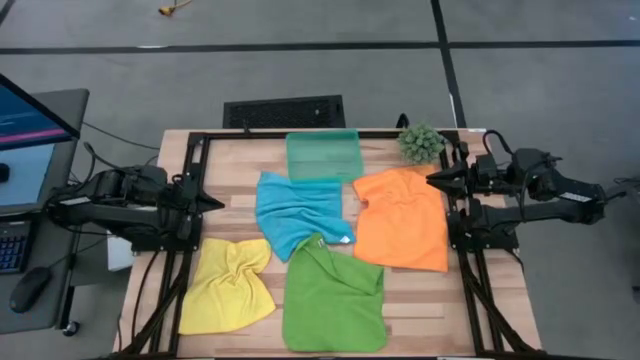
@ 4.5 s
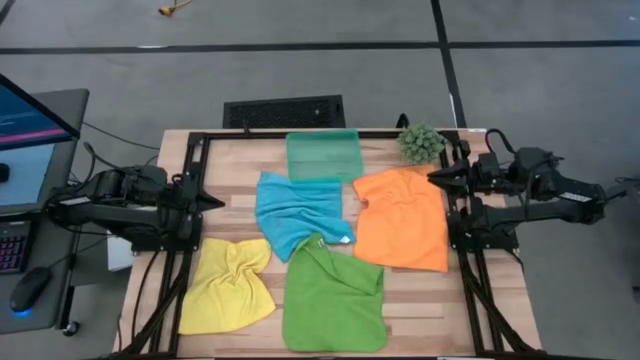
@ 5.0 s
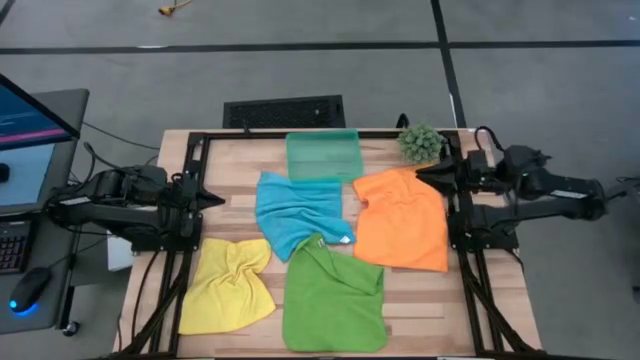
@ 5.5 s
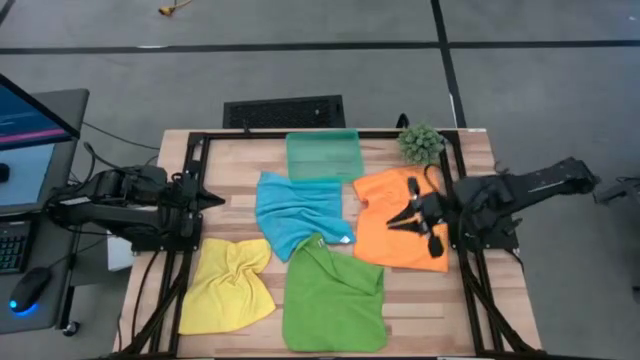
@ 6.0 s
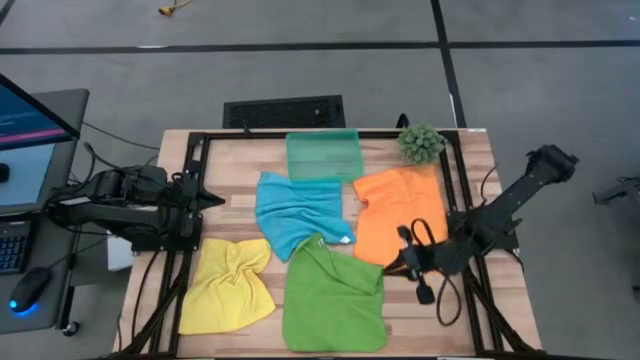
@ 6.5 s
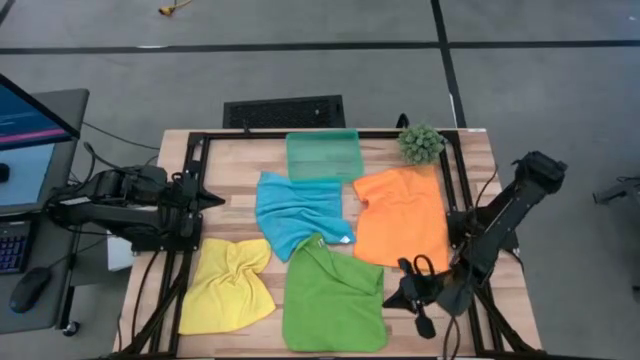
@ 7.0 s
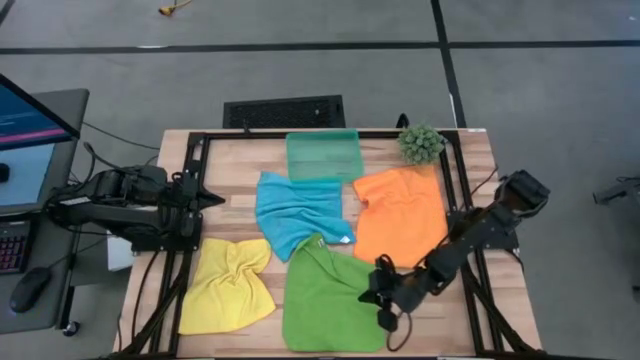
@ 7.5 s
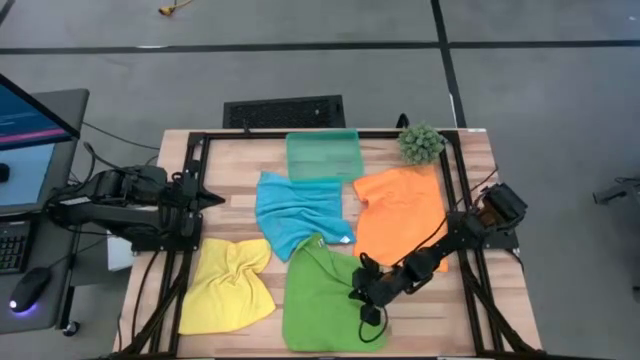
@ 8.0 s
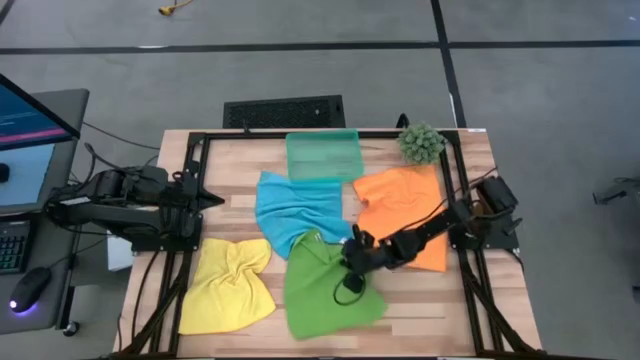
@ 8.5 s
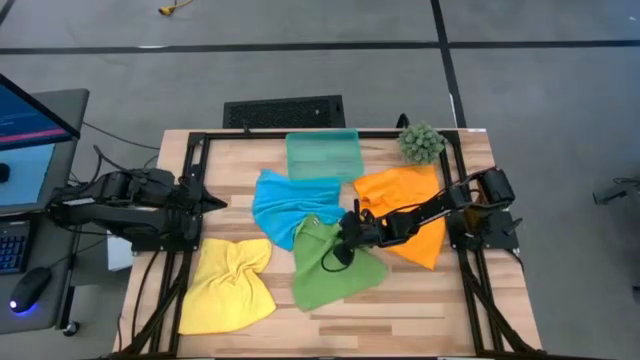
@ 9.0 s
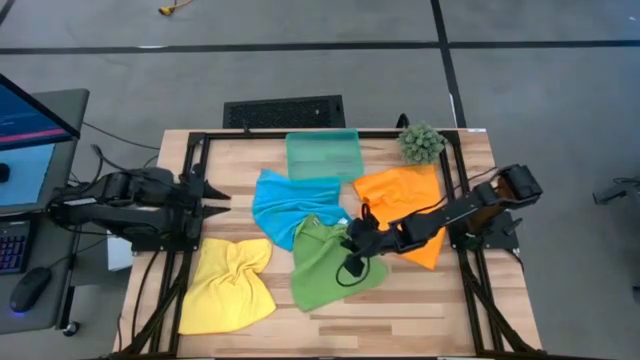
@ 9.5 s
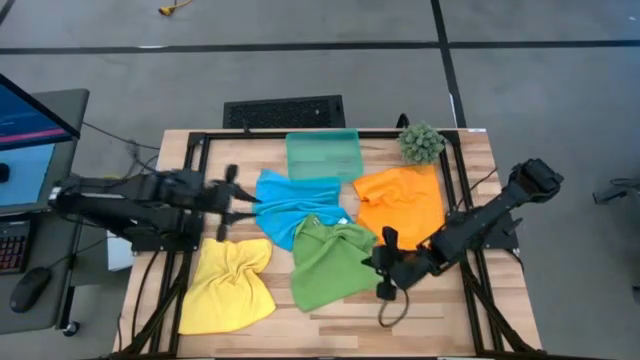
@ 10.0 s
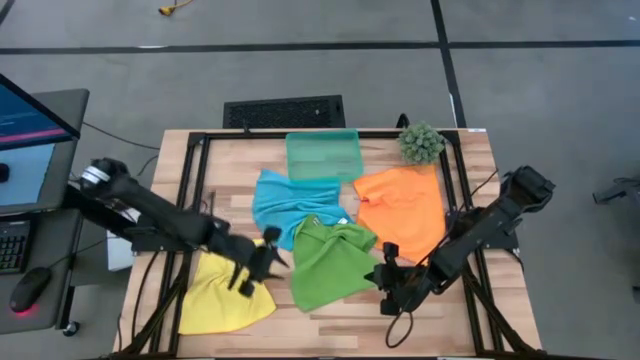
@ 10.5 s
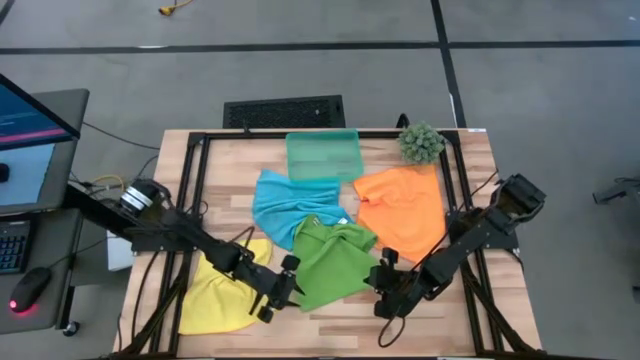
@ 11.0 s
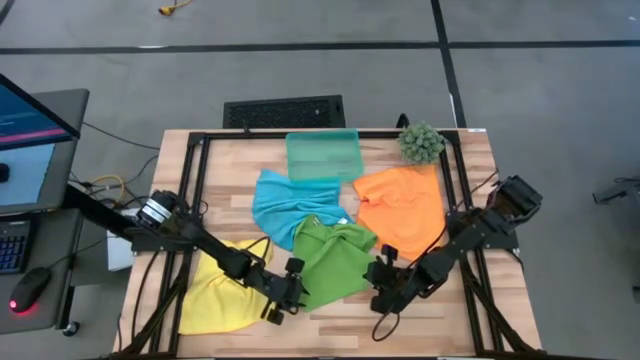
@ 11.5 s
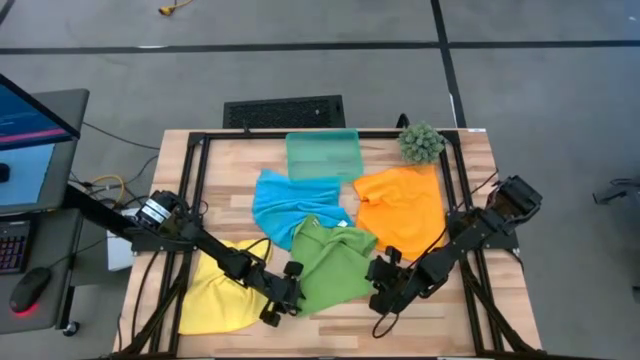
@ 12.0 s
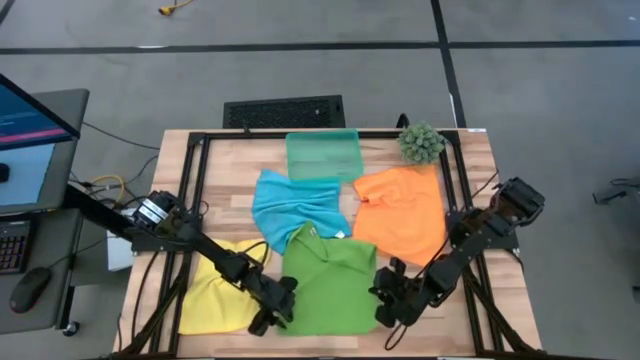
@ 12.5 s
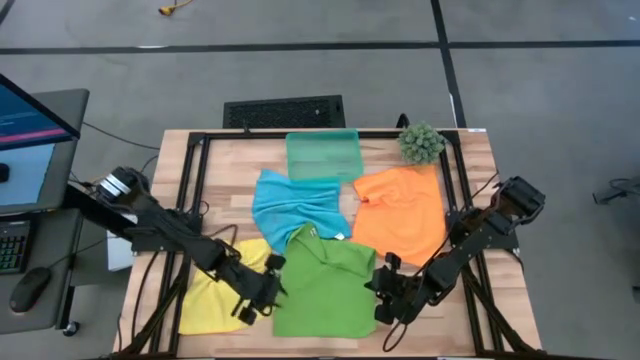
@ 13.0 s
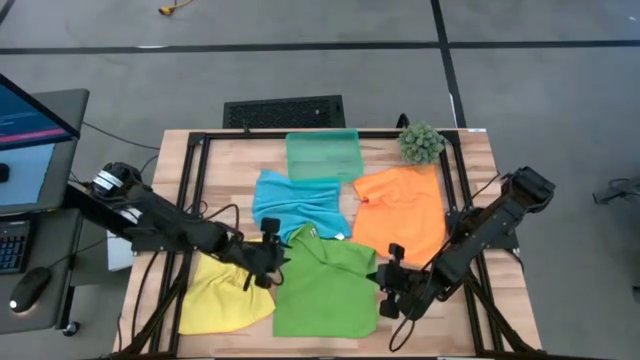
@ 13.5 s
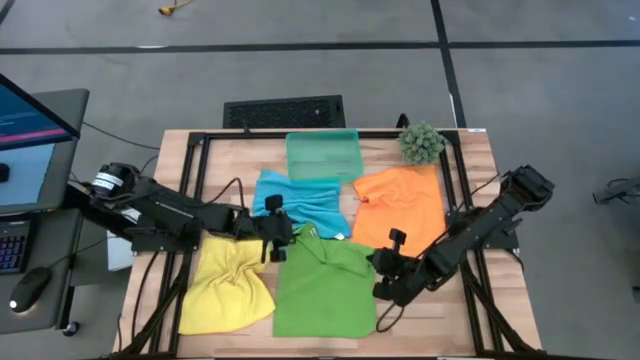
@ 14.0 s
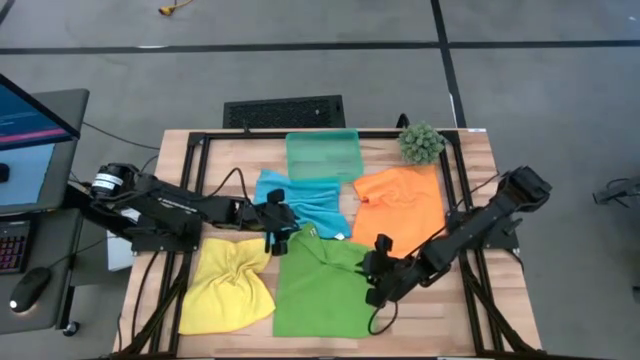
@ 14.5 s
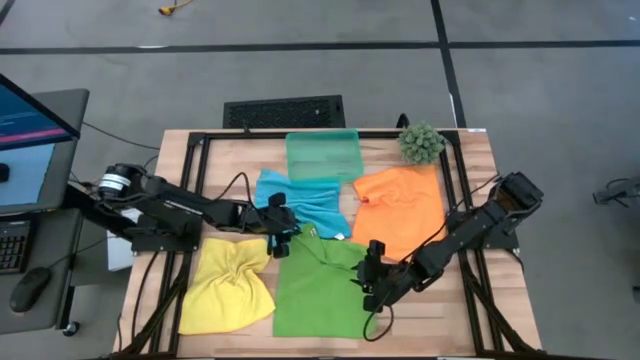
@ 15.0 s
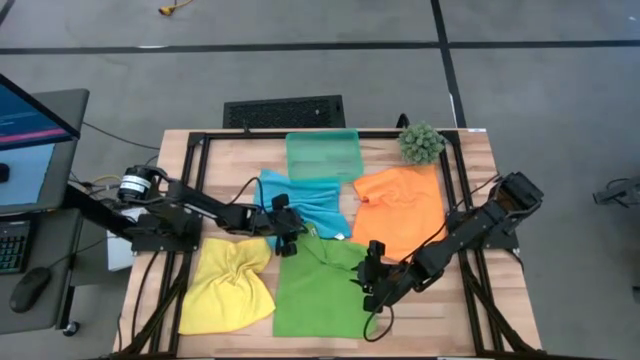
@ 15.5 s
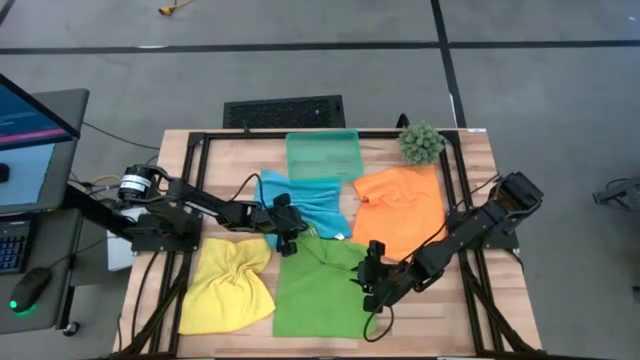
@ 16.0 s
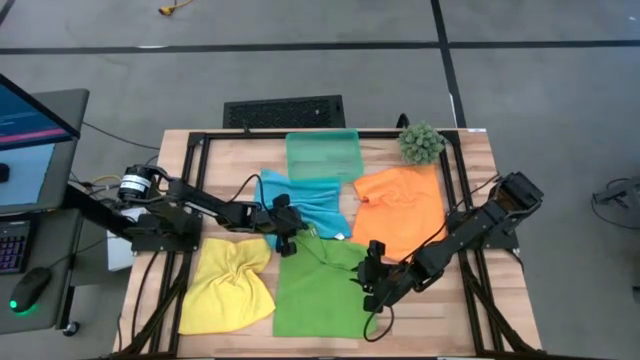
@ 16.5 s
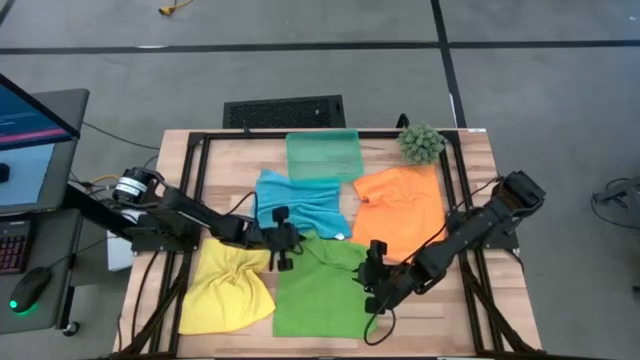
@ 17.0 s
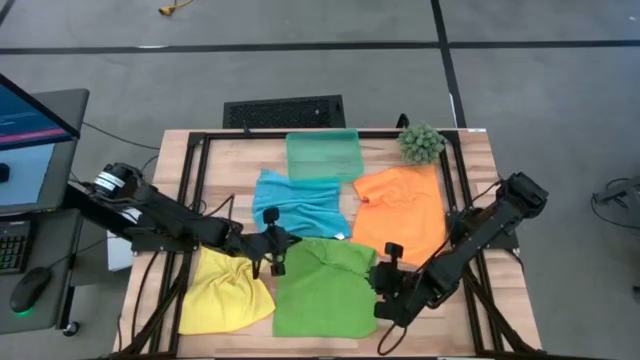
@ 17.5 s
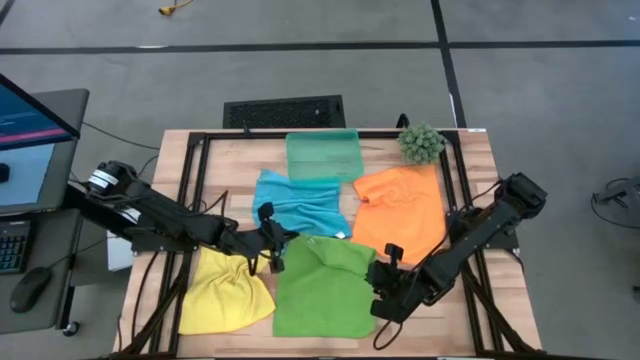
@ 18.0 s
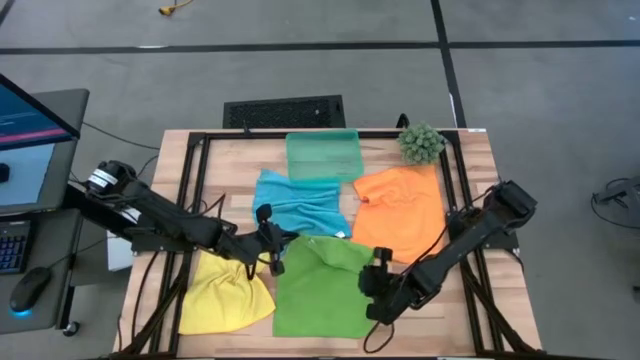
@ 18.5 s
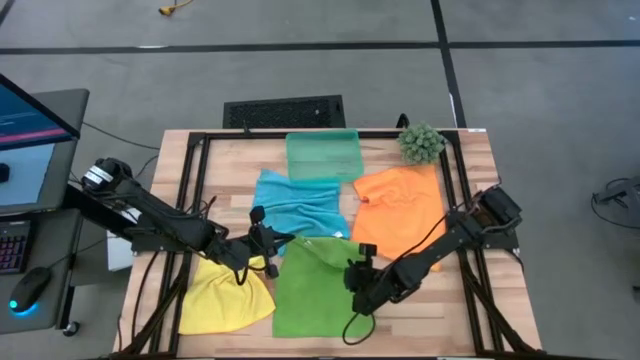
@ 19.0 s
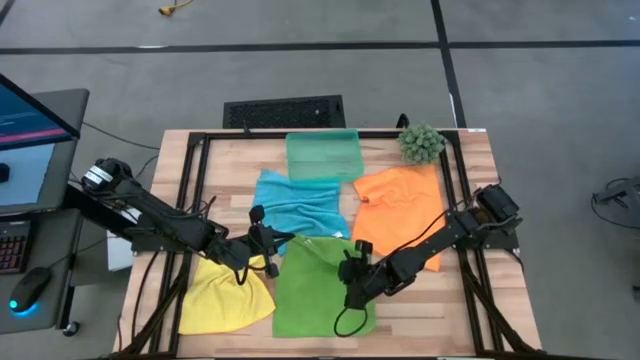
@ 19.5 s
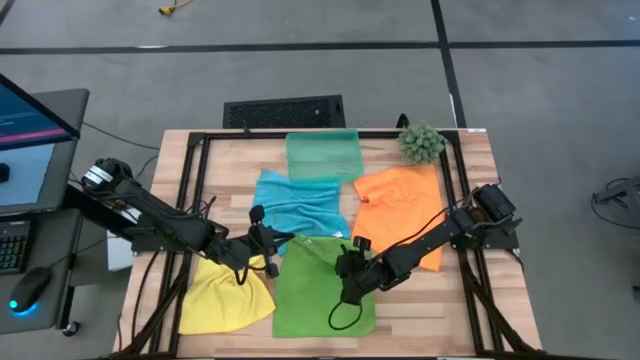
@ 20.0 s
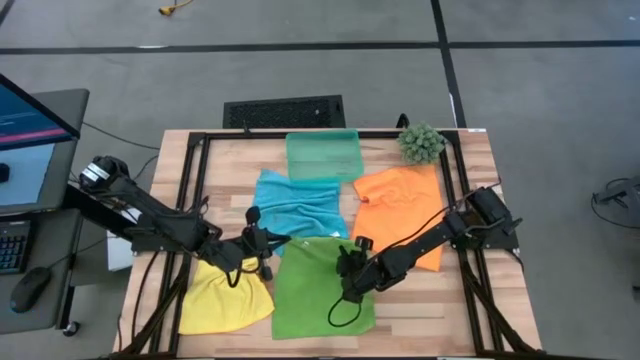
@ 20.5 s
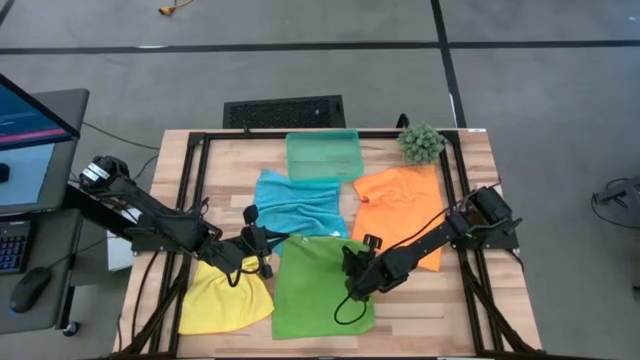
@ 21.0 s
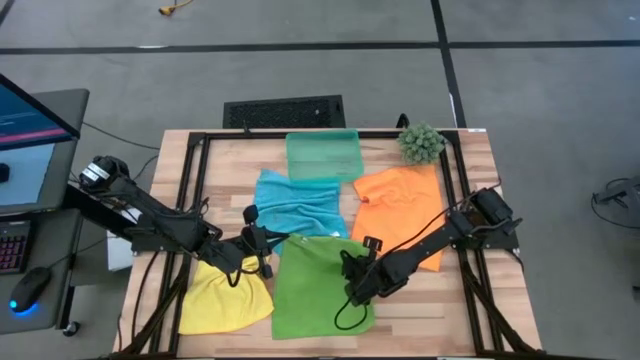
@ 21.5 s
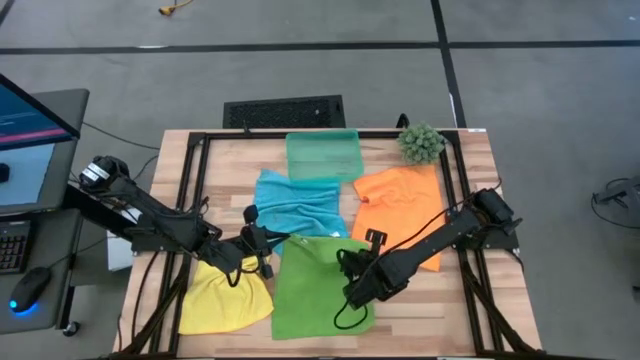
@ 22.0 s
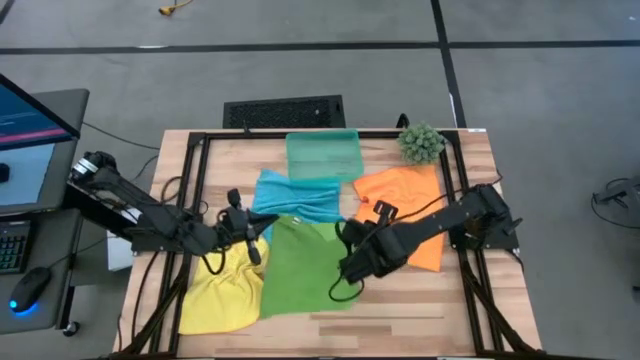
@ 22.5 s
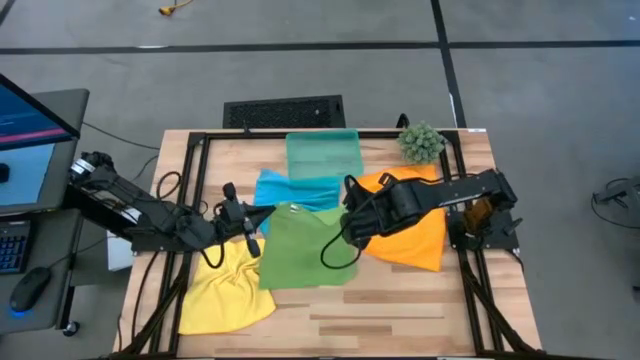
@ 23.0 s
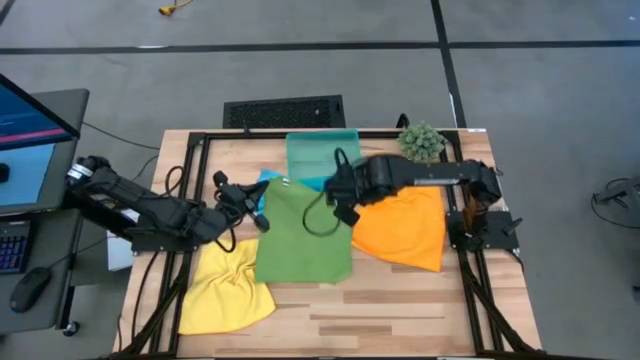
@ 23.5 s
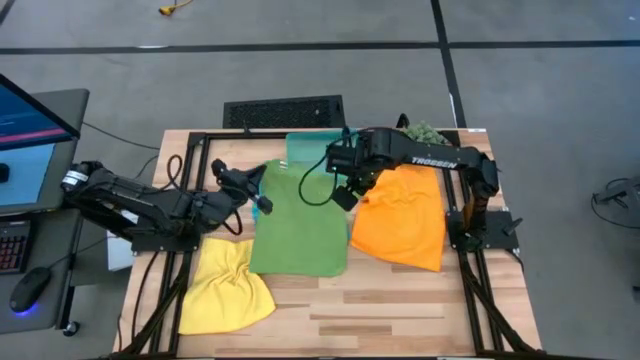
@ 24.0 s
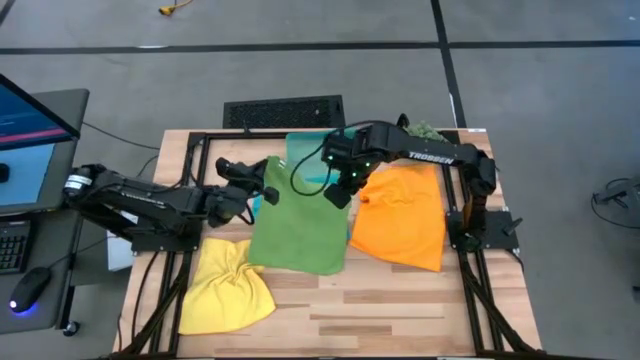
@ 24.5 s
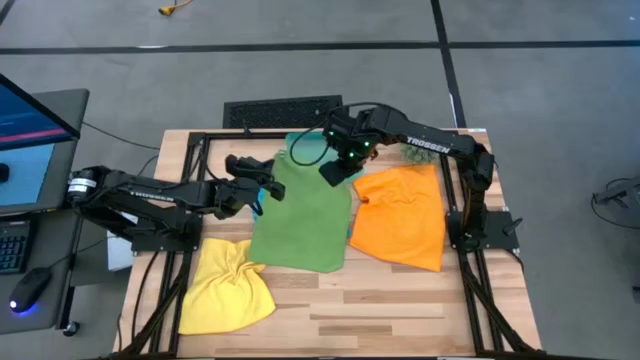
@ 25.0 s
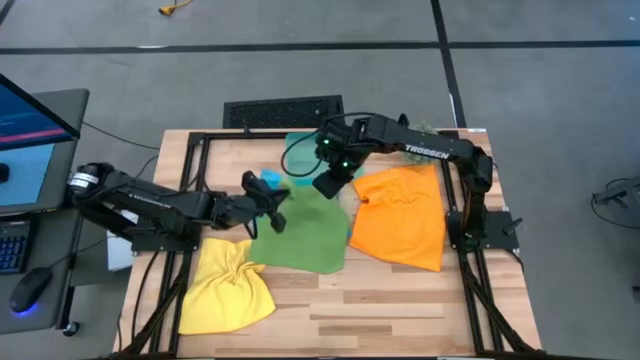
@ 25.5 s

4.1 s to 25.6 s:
Task: Roll microfiber towels into tight, uniform cylinder then place into a basket
Roll the green microfiber cloth
